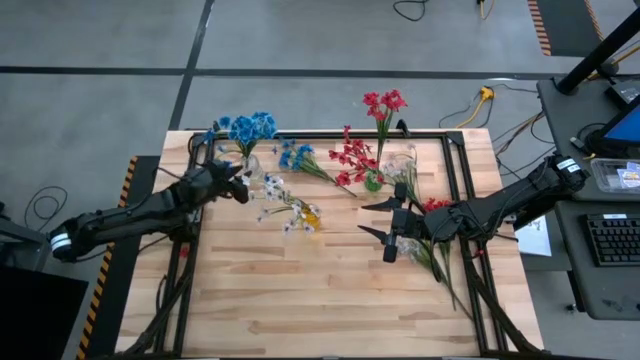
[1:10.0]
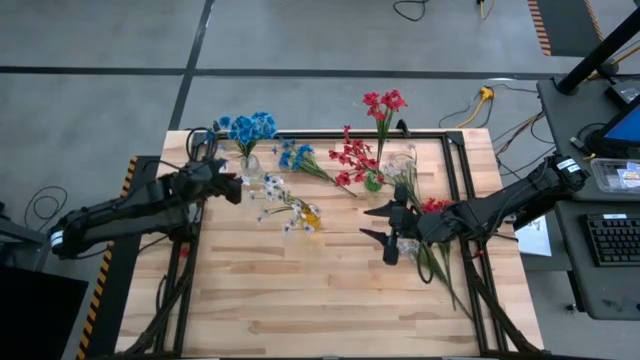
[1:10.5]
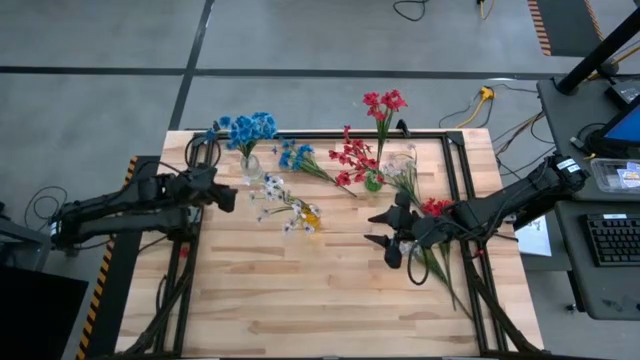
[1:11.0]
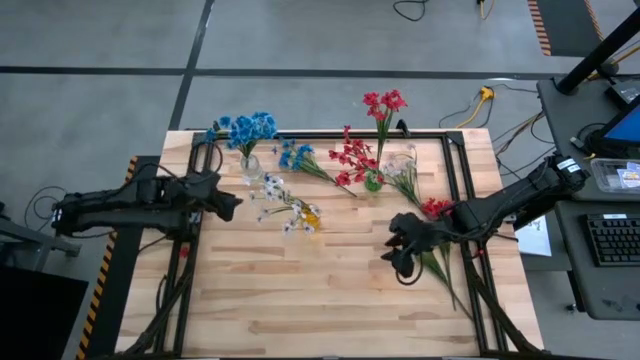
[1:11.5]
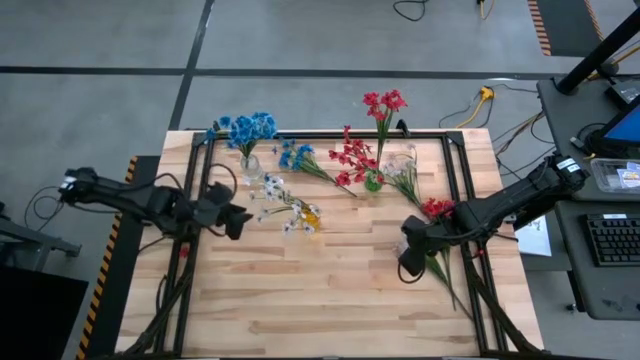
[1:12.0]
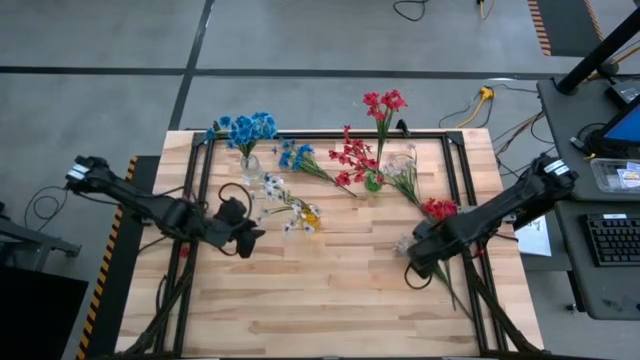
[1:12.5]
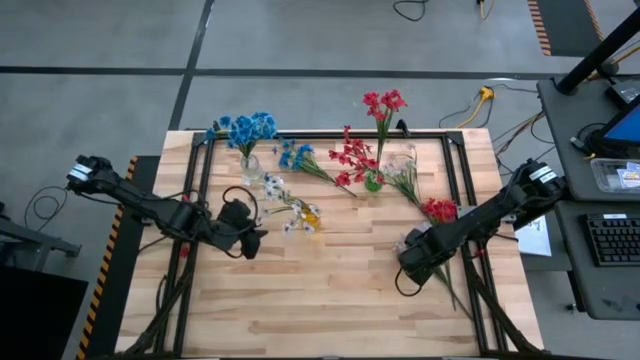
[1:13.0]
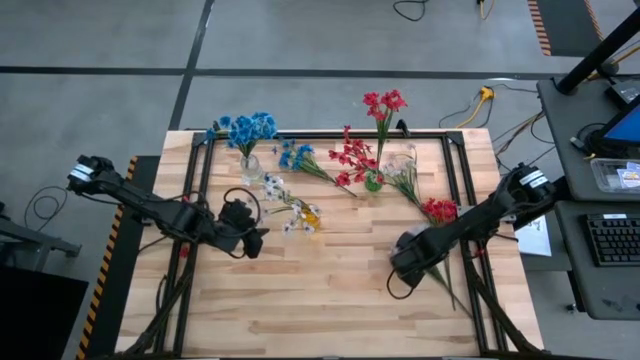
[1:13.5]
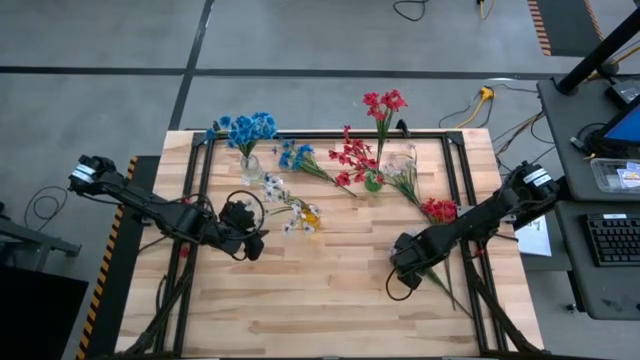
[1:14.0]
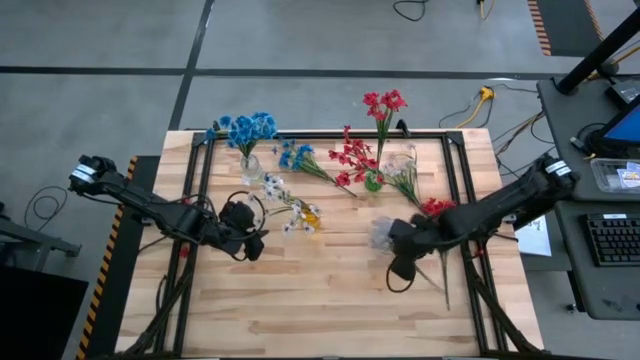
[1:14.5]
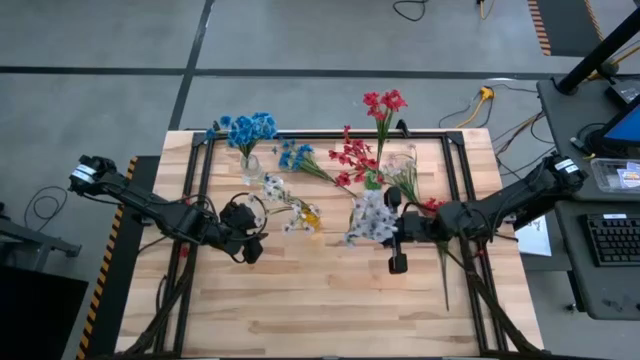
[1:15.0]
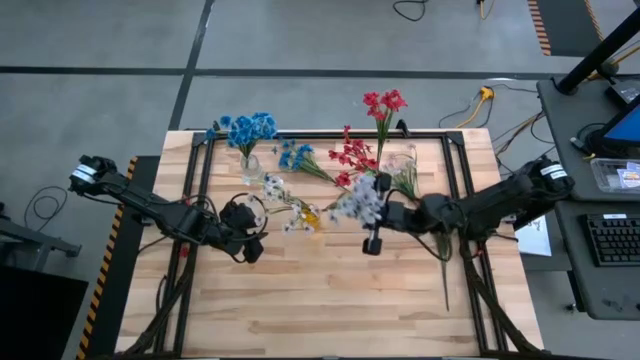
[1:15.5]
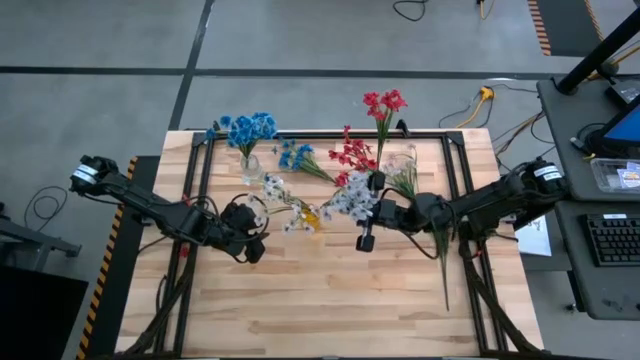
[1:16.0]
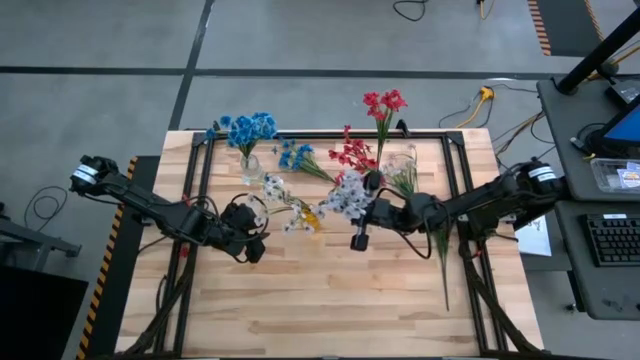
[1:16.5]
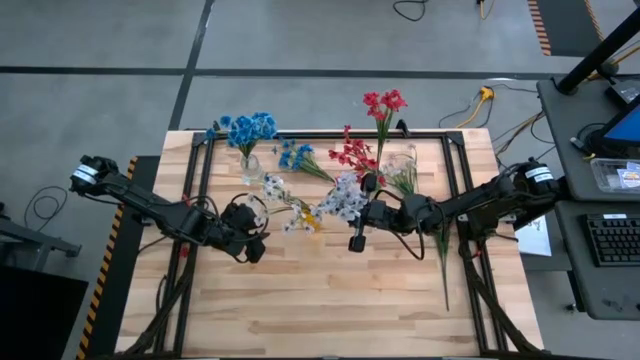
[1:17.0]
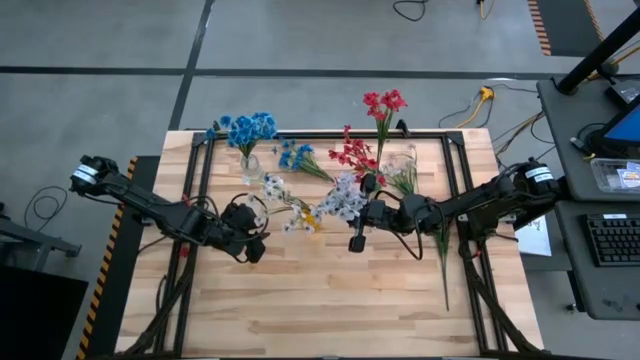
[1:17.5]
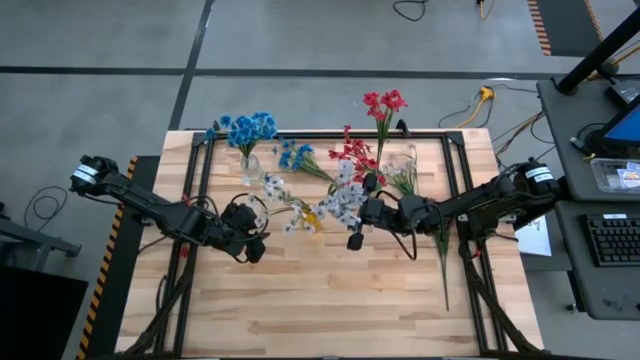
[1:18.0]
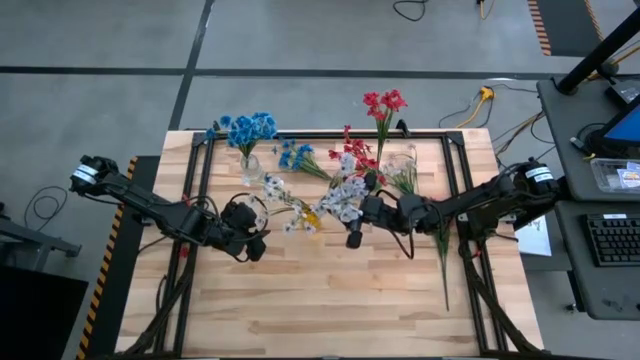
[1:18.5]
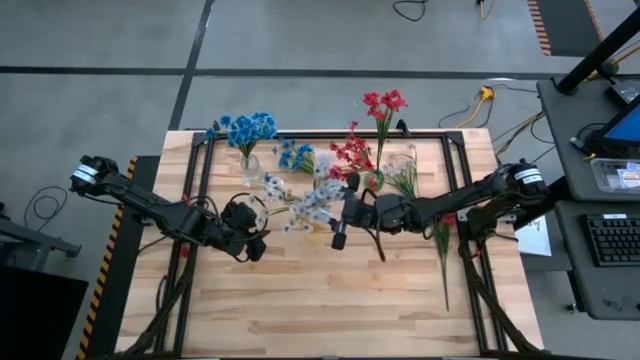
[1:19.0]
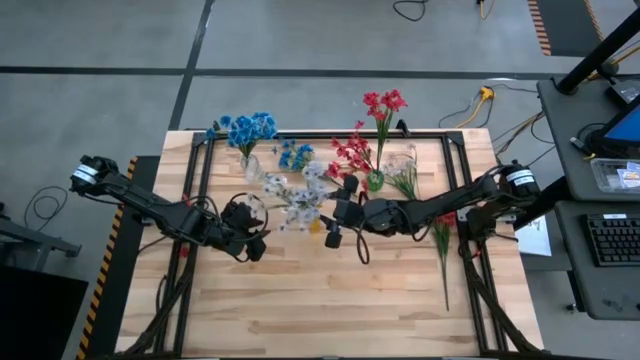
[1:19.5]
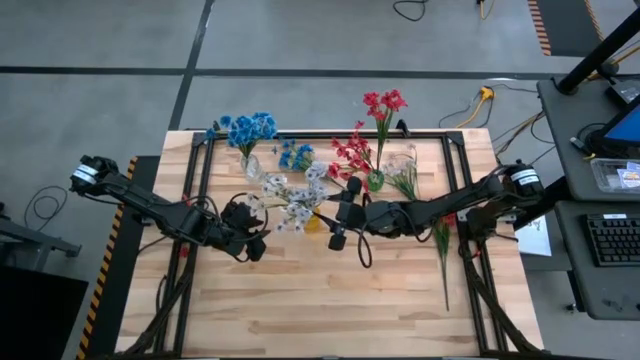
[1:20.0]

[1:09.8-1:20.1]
Task: Sort flowers into vase by color
Put the bottom white flowers into the yellow vase

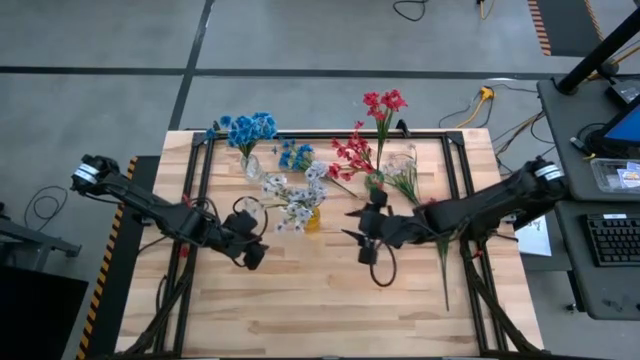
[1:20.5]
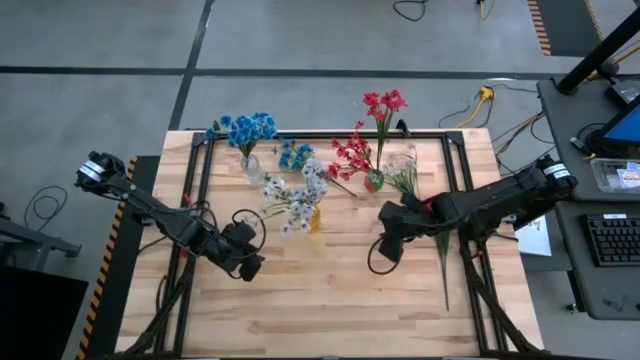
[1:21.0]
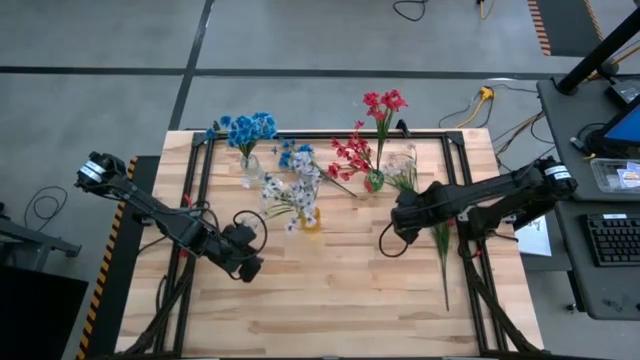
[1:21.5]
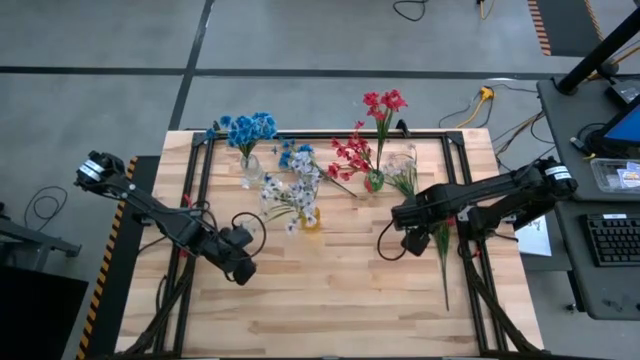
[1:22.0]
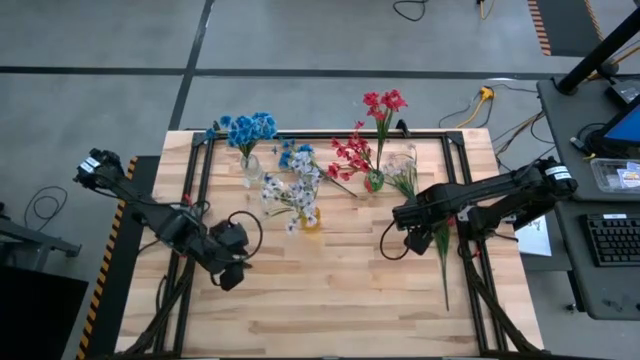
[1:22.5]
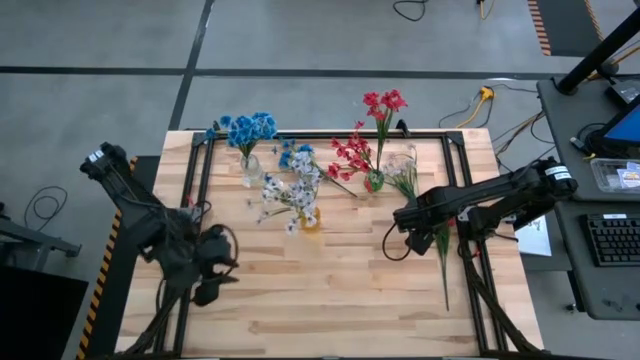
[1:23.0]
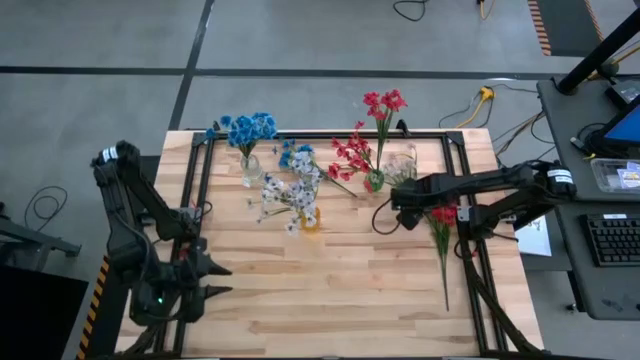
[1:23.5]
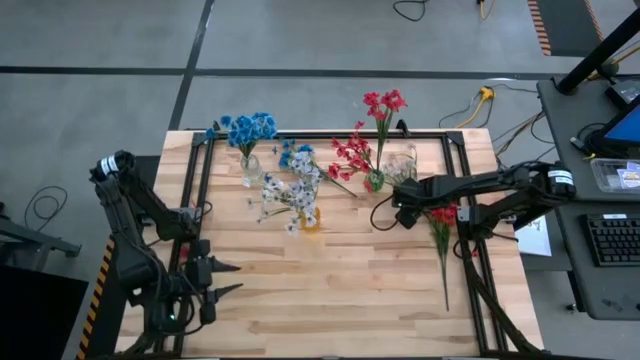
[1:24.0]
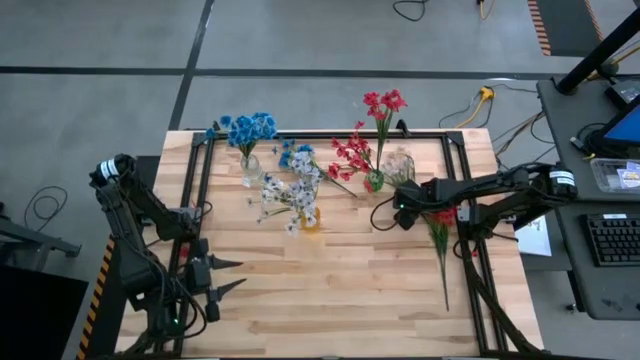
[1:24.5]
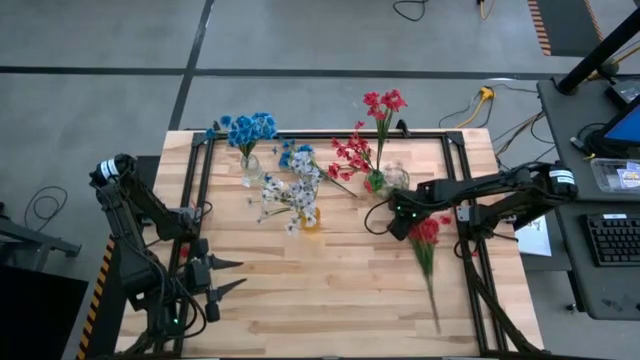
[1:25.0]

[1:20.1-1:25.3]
Adjust the white flowers on the table

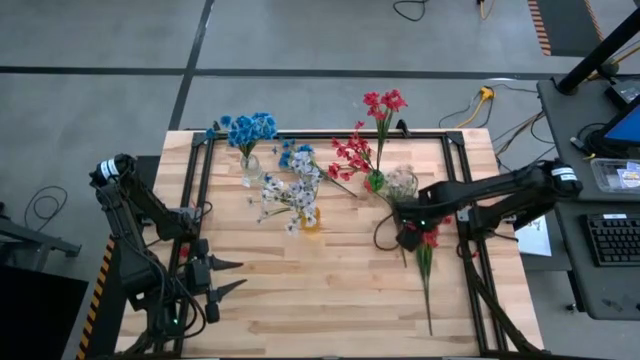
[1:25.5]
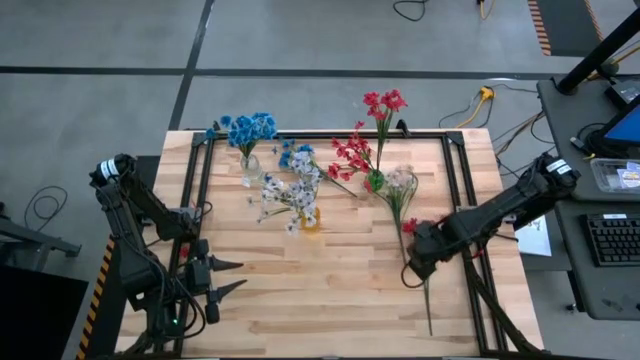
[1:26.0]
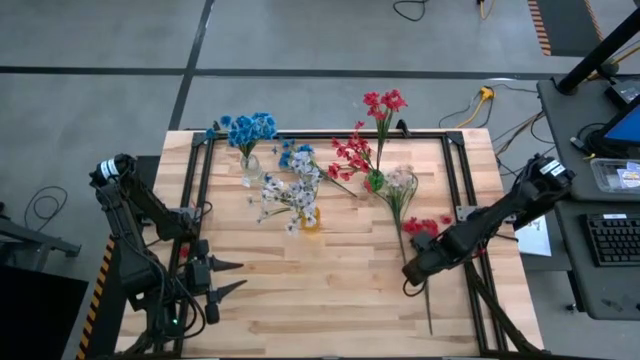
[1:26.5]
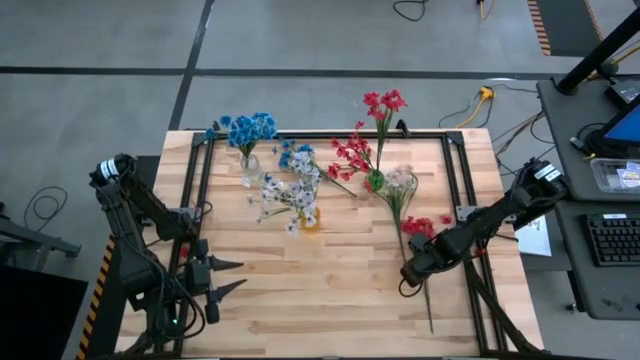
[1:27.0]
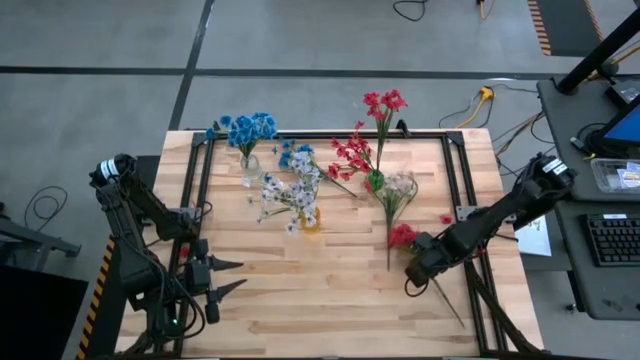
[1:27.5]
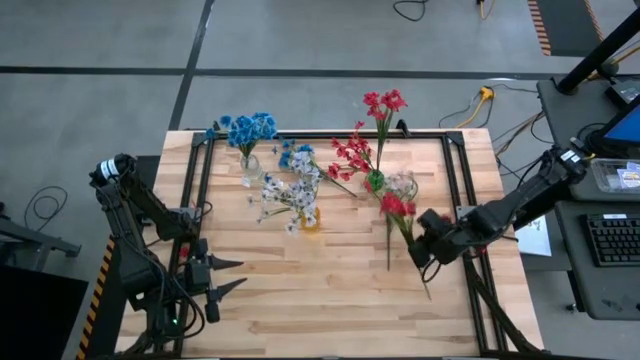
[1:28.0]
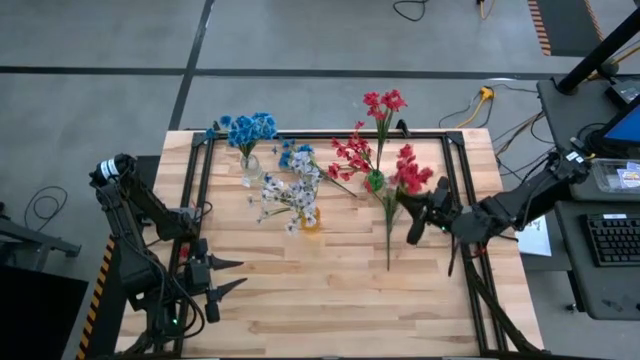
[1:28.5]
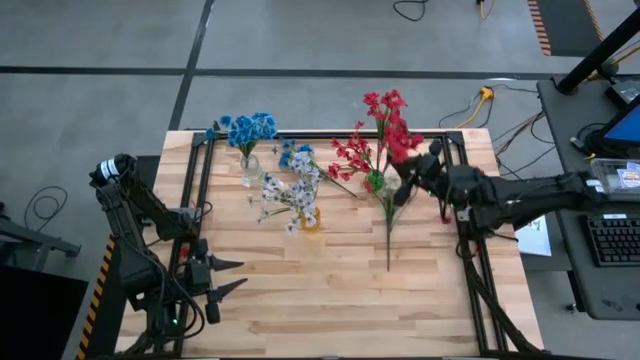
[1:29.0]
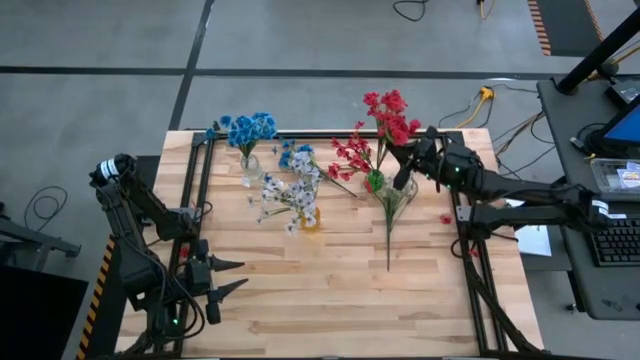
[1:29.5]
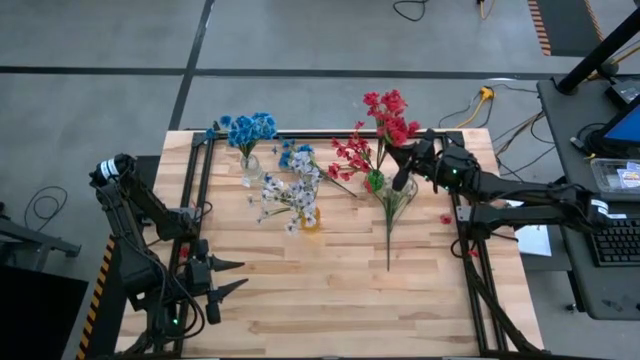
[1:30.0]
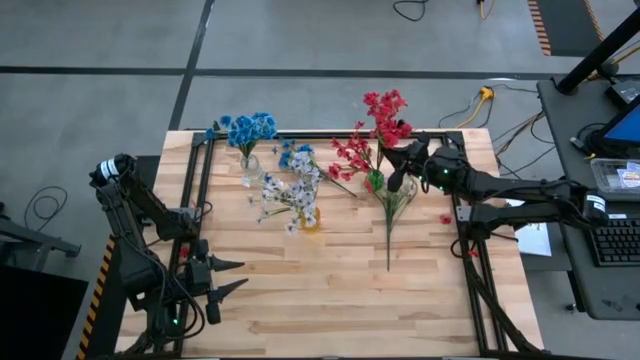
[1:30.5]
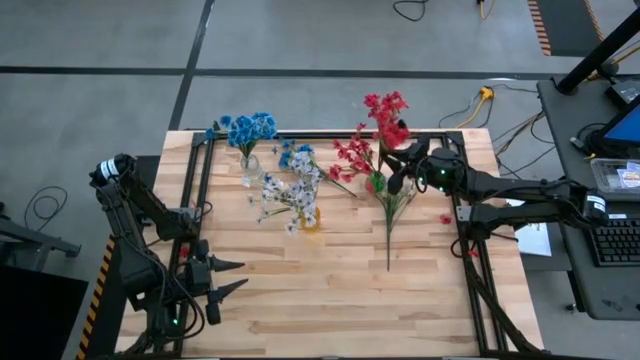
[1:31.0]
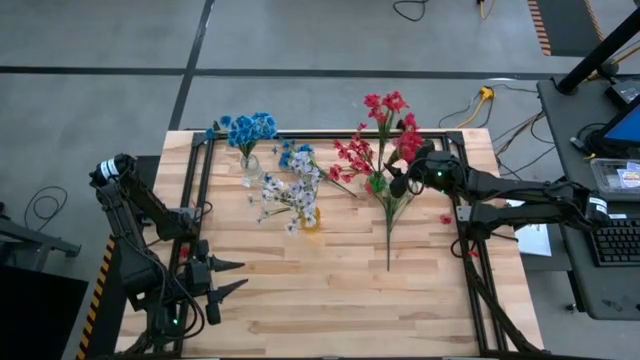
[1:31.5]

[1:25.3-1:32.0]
Put the red flowers into the green vase
